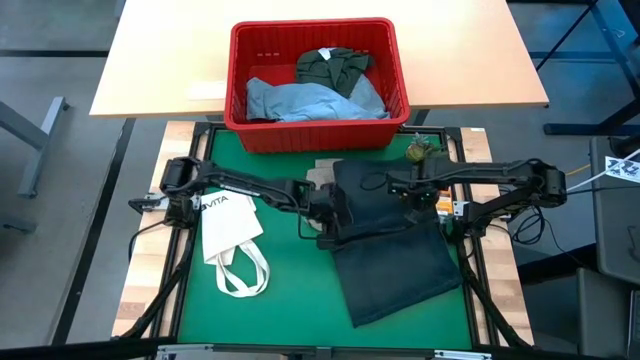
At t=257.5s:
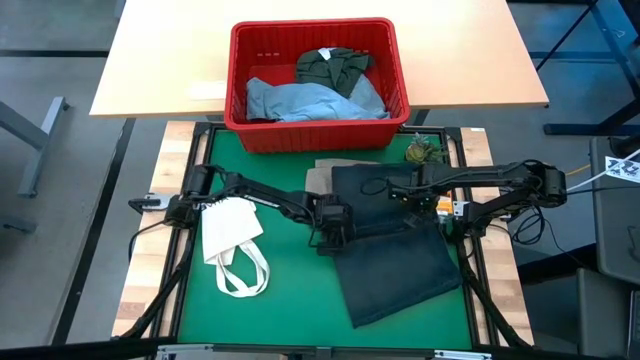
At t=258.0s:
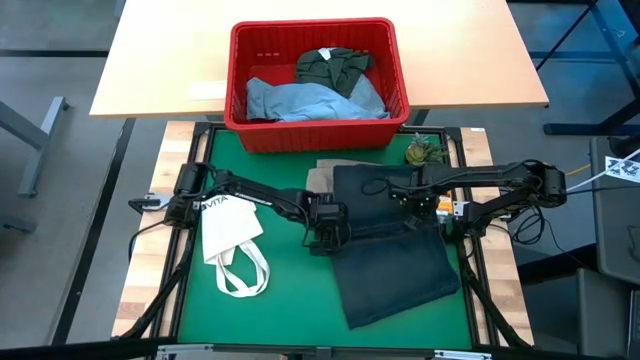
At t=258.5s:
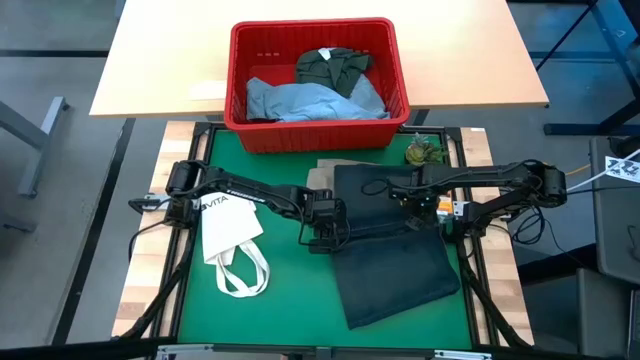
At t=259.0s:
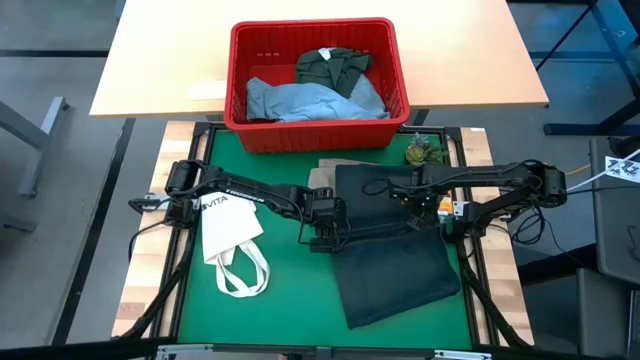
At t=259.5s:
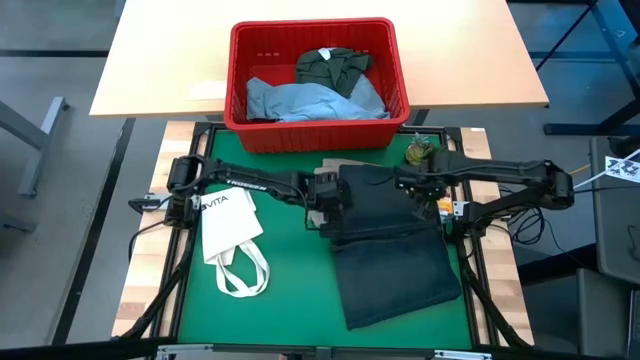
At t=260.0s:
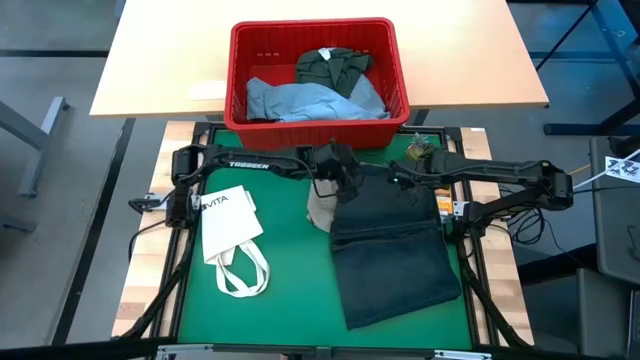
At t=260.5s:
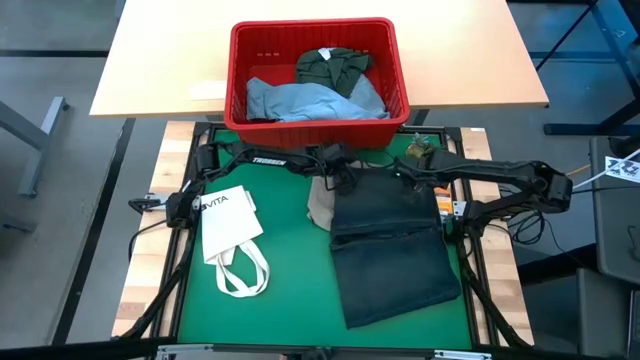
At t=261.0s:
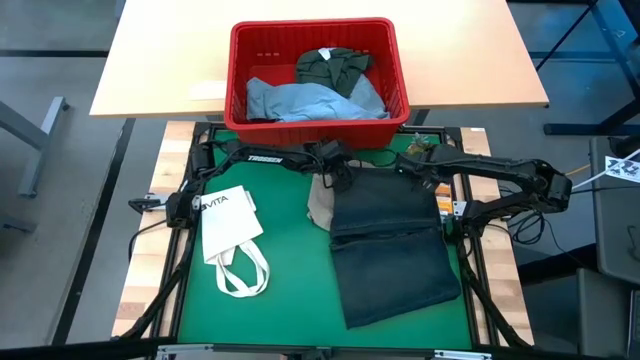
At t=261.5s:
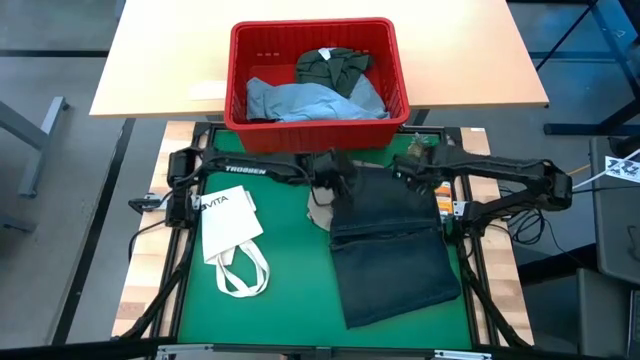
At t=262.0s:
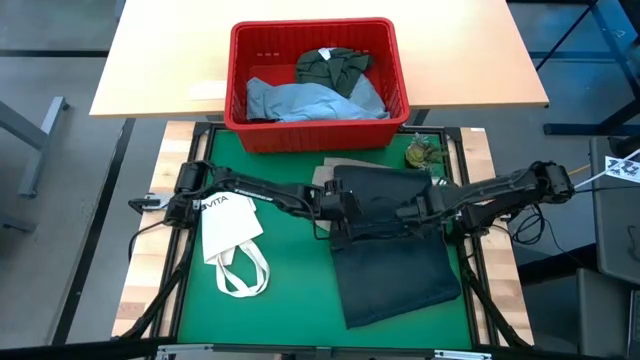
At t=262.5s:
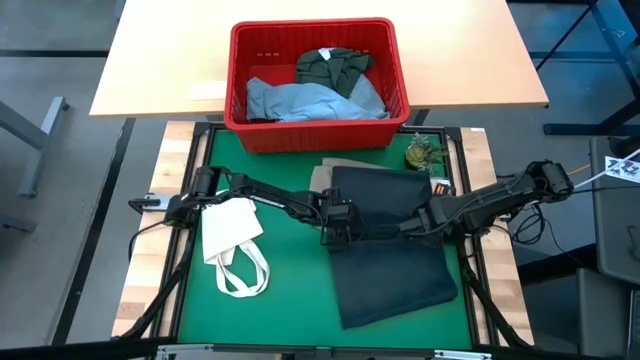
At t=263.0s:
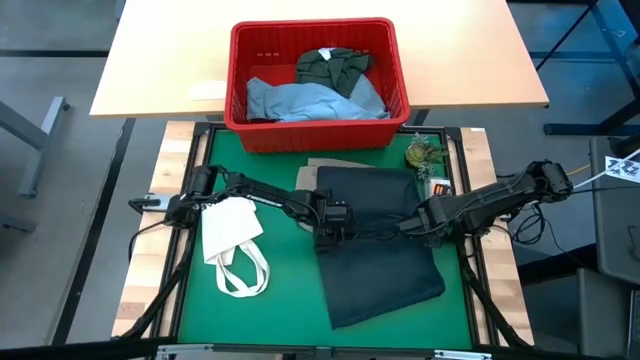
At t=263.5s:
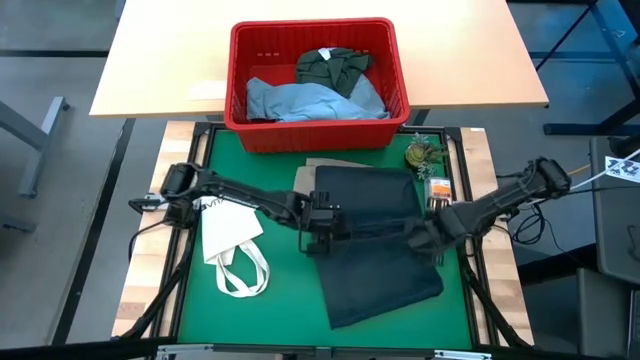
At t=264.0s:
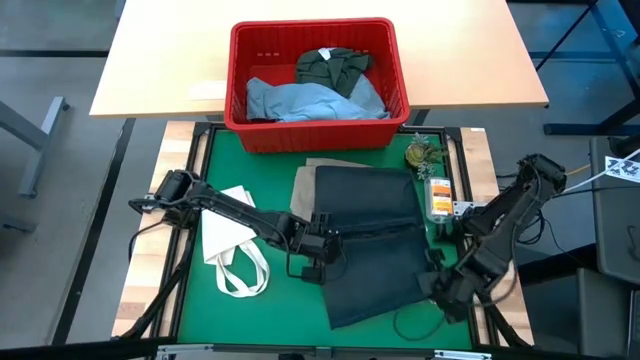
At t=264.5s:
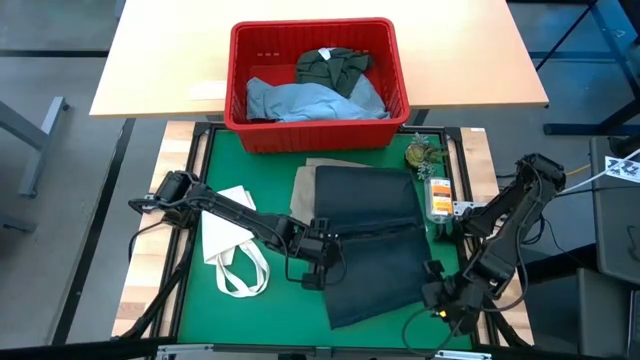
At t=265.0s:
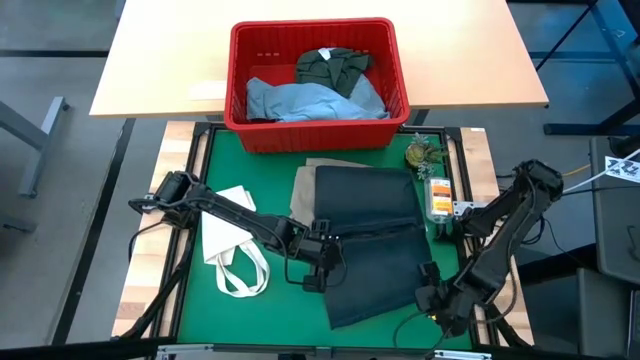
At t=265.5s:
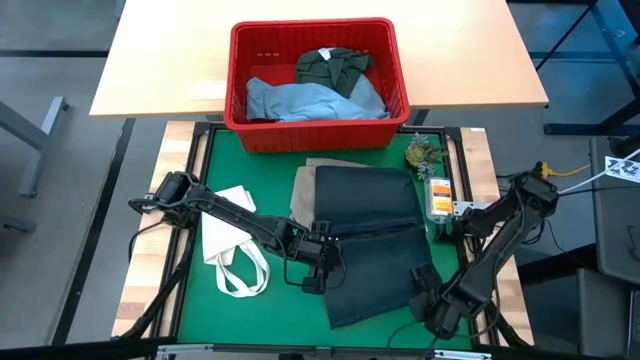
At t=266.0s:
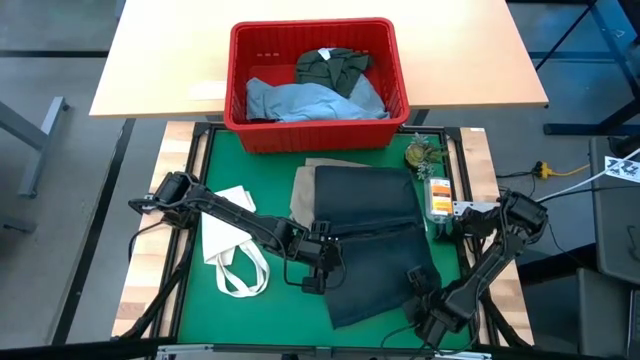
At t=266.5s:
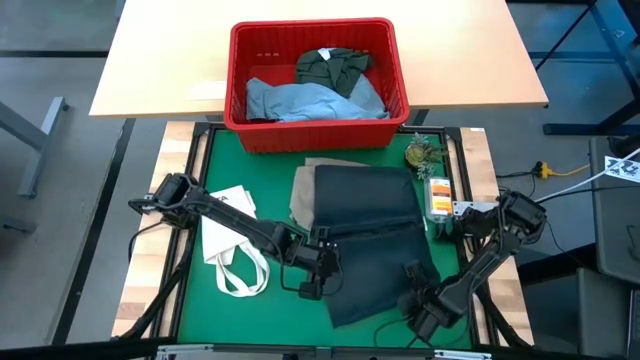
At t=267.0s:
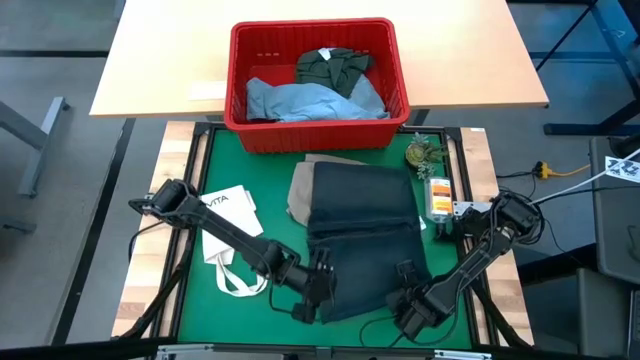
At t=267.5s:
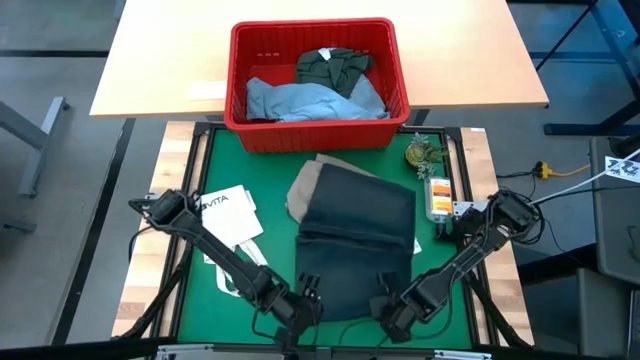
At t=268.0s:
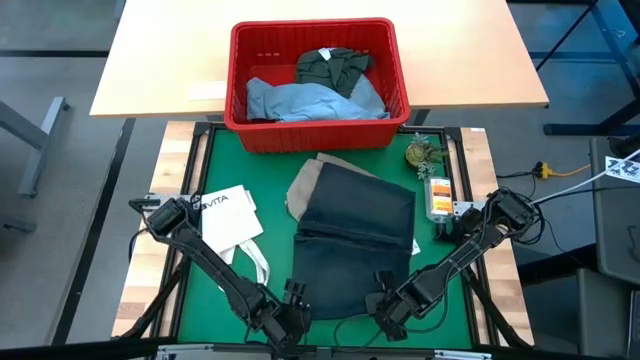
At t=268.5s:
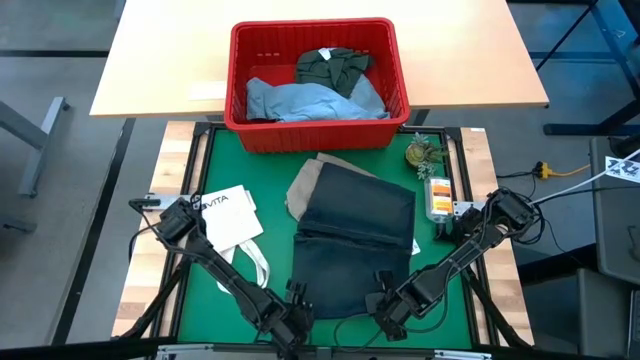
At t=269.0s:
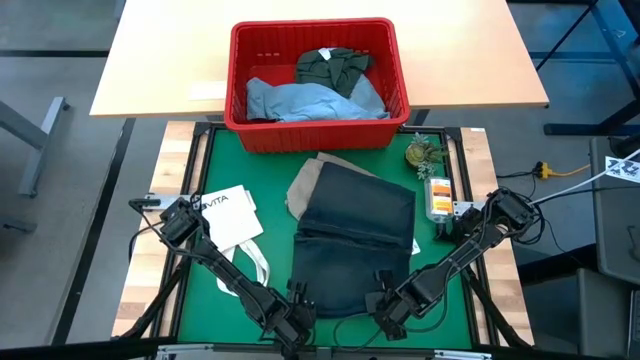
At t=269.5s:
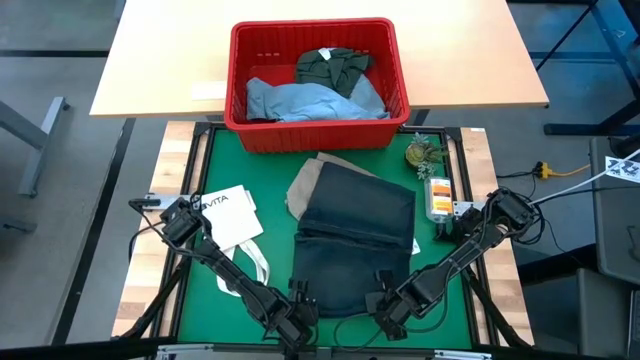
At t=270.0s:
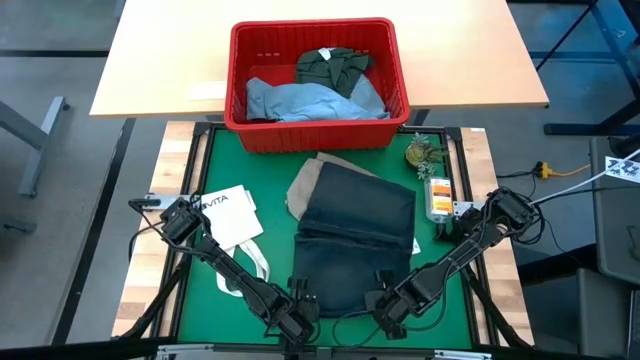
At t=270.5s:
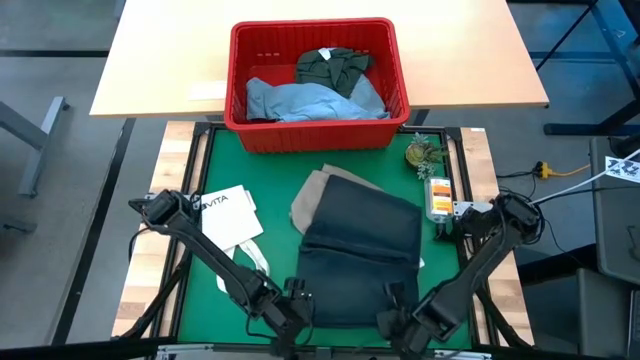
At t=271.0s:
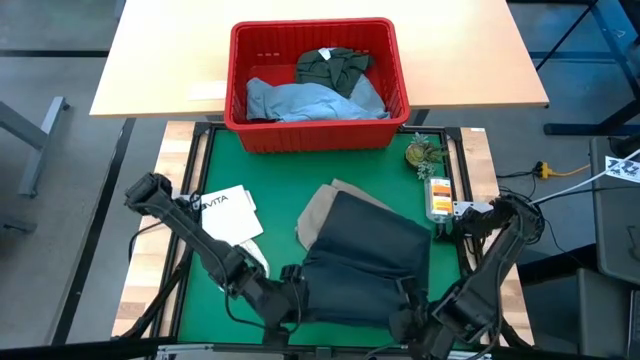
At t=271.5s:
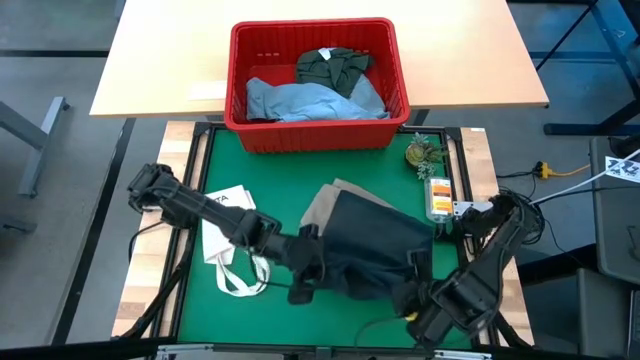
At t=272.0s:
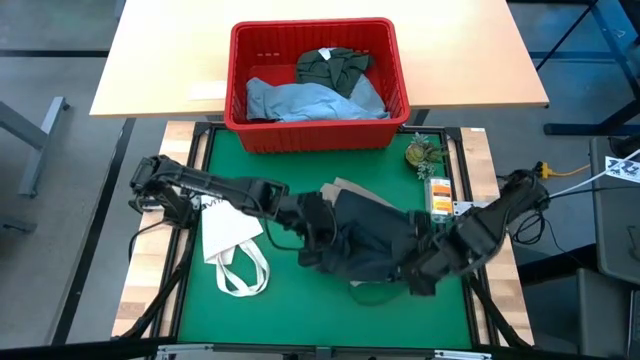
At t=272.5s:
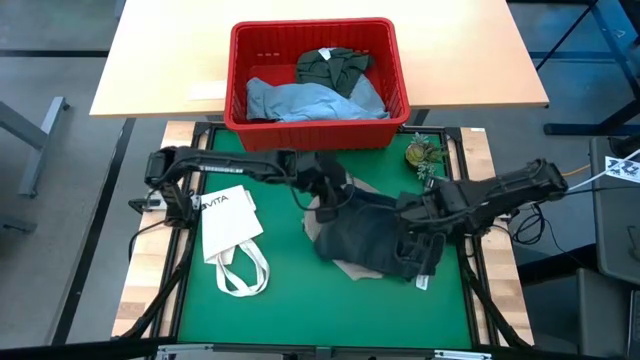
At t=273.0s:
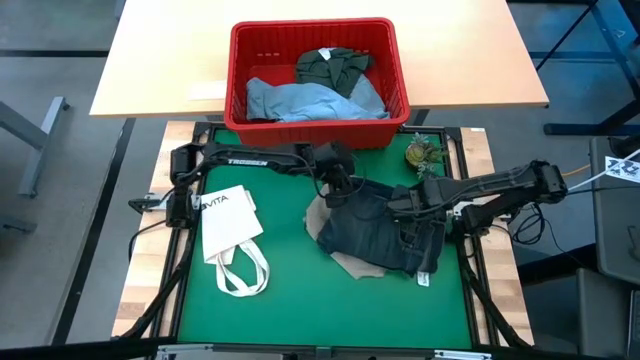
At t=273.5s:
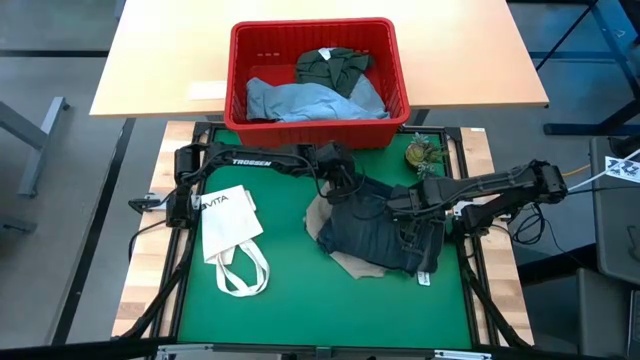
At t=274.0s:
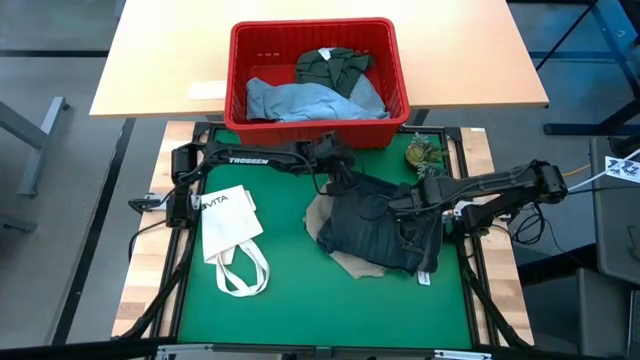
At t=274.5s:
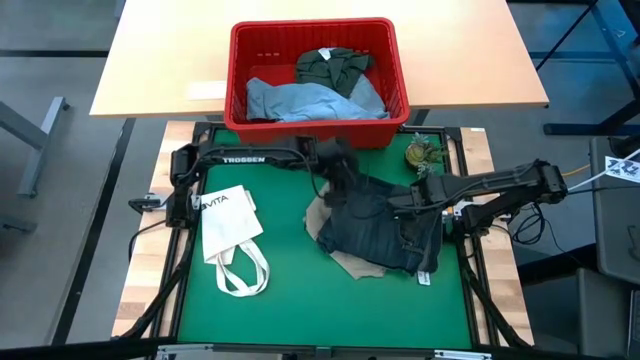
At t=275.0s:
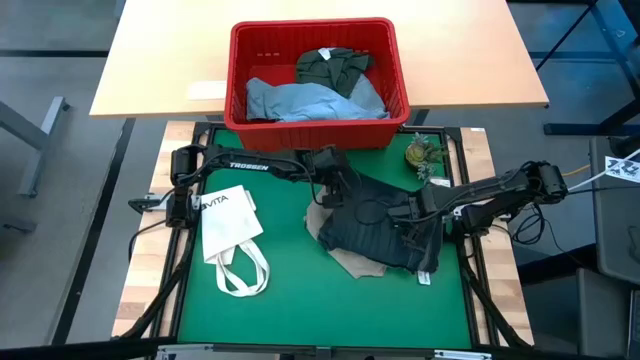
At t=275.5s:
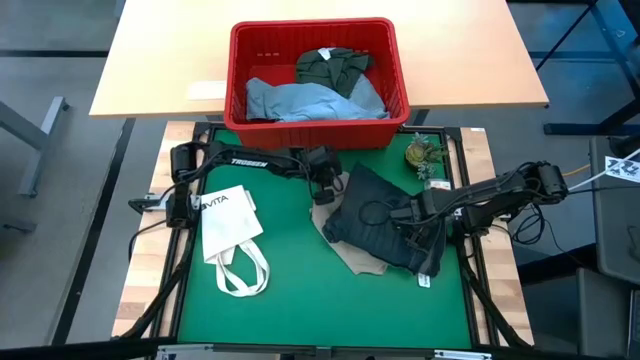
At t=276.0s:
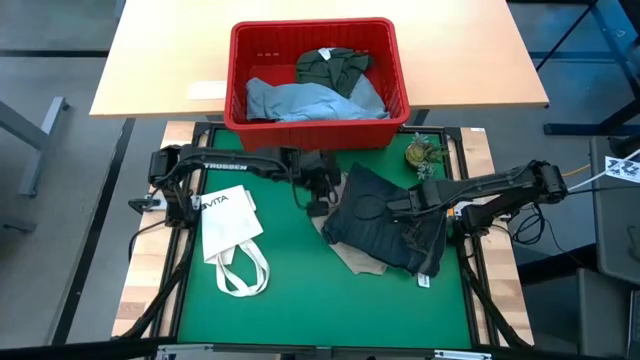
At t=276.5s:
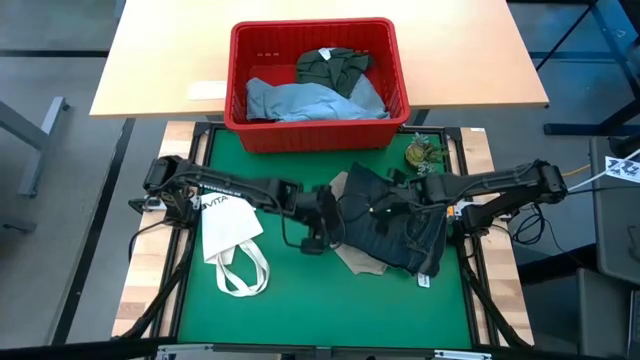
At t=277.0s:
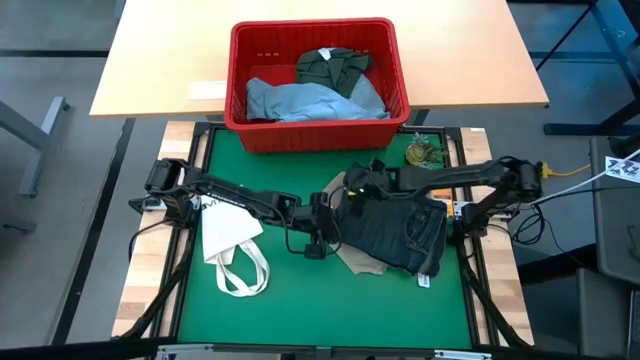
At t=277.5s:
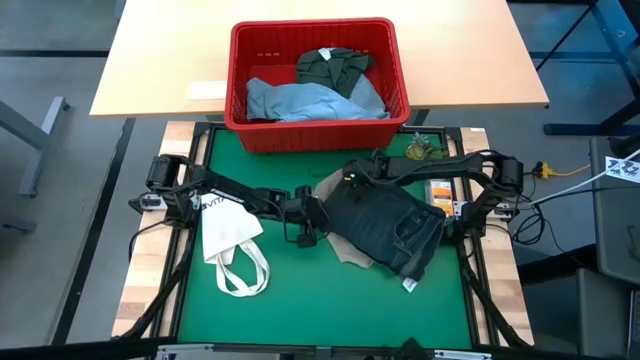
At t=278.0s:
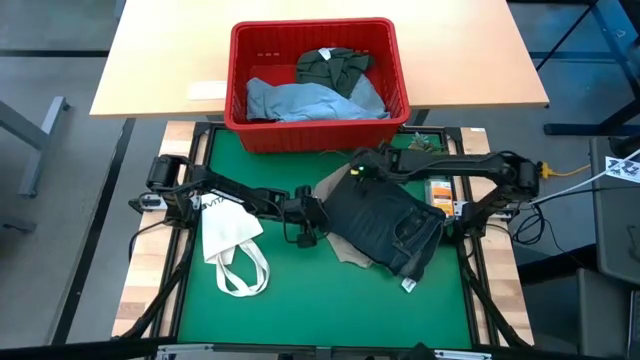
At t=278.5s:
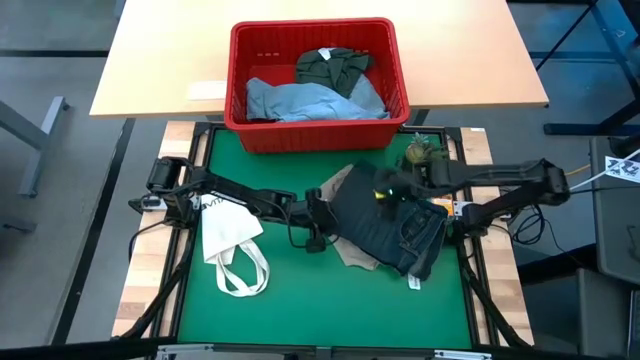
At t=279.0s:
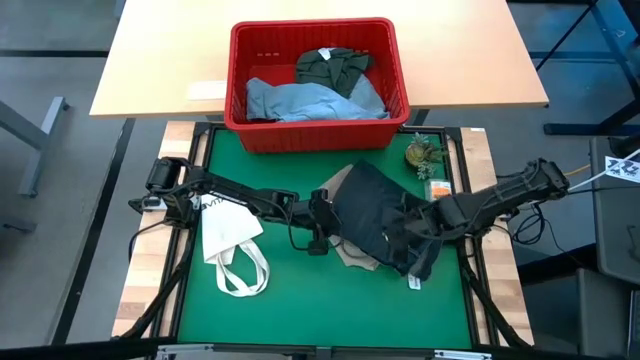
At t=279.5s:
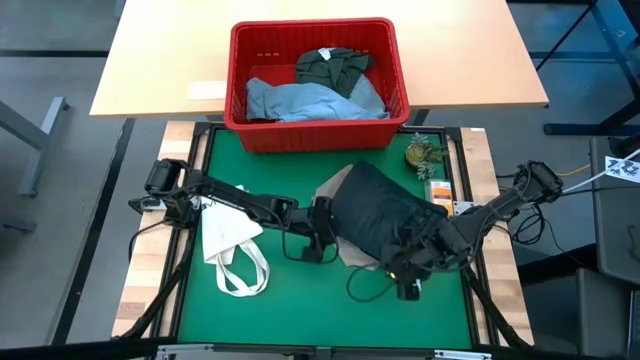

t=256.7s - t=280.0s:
Task: Fold Laundry from Bin
Fold the dark blue jeans
